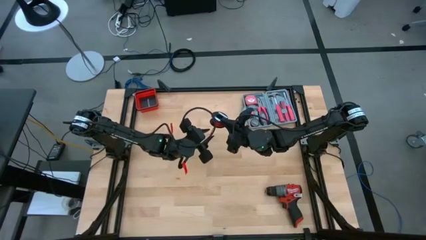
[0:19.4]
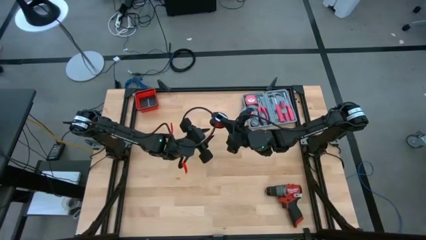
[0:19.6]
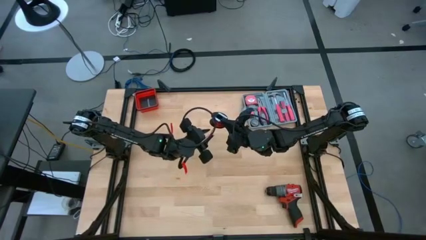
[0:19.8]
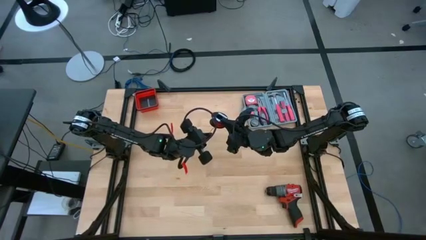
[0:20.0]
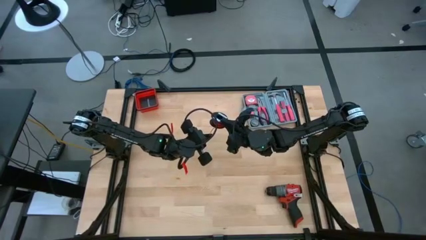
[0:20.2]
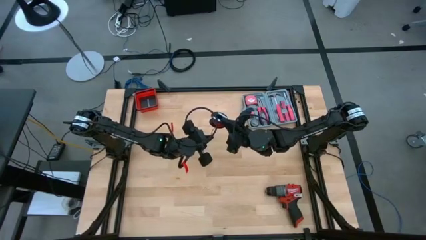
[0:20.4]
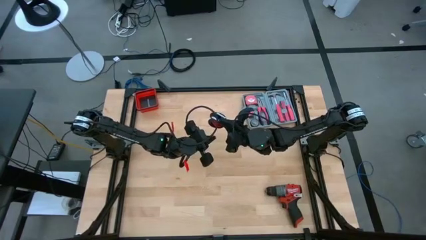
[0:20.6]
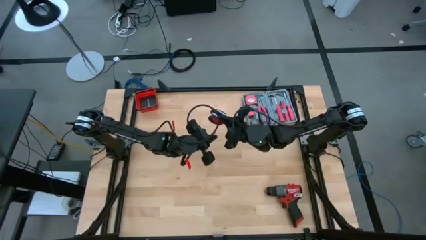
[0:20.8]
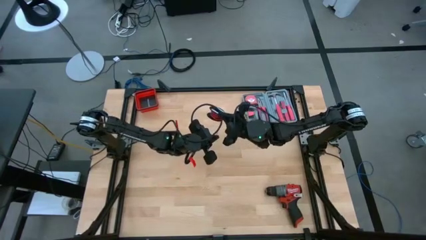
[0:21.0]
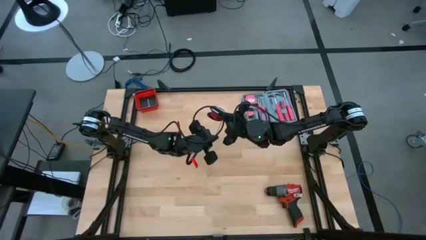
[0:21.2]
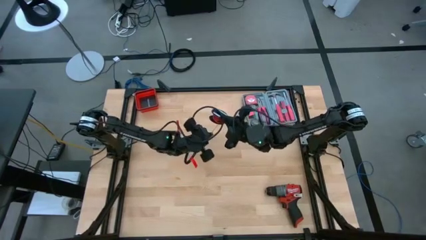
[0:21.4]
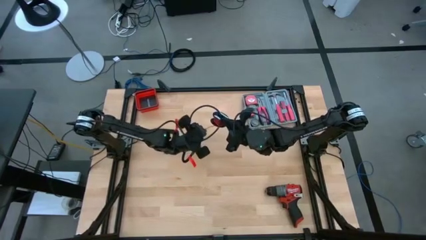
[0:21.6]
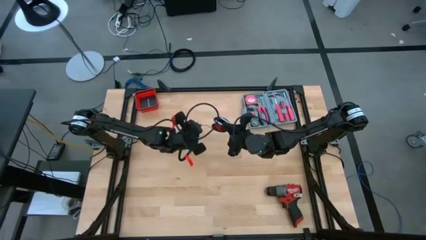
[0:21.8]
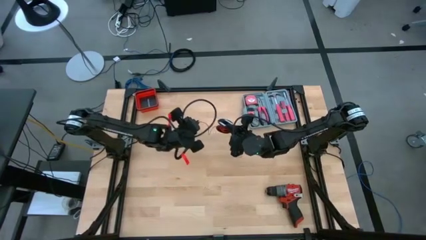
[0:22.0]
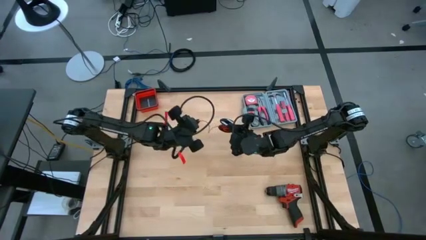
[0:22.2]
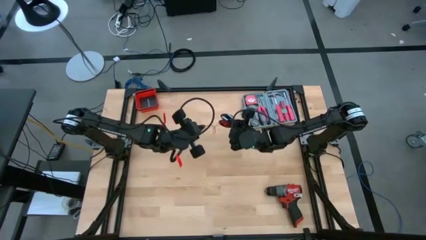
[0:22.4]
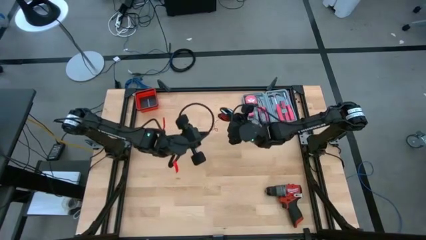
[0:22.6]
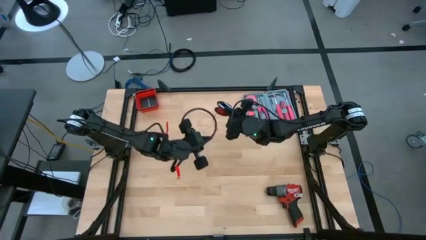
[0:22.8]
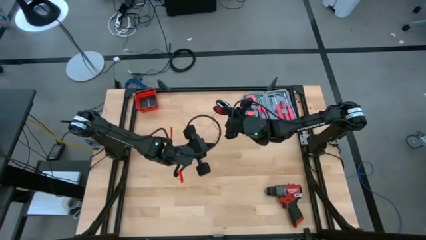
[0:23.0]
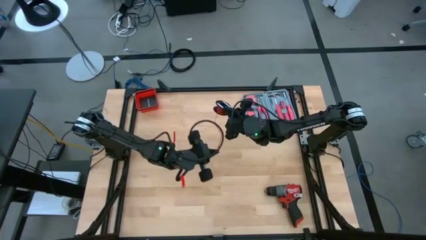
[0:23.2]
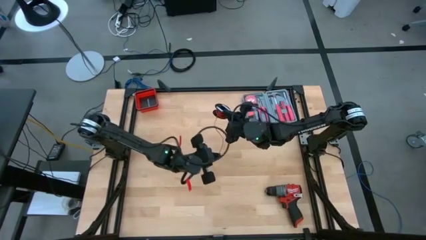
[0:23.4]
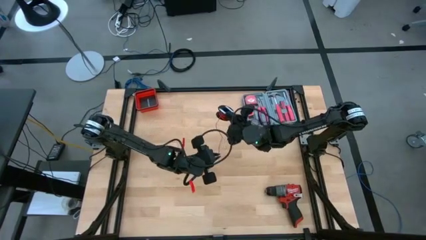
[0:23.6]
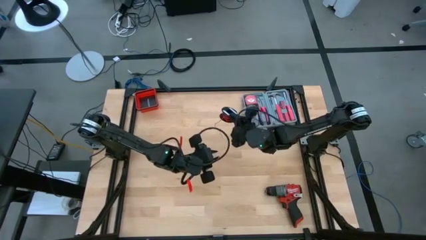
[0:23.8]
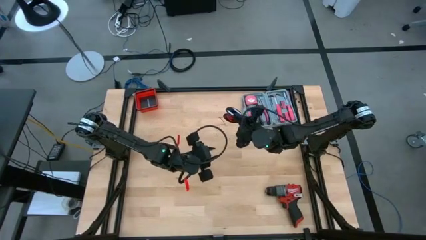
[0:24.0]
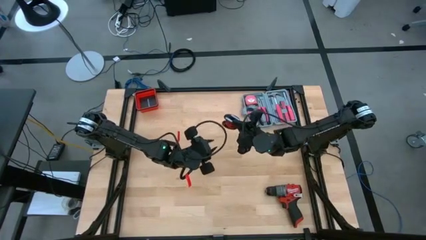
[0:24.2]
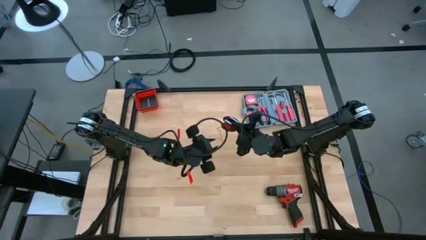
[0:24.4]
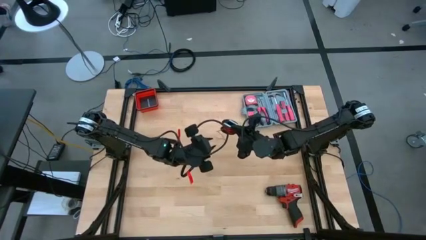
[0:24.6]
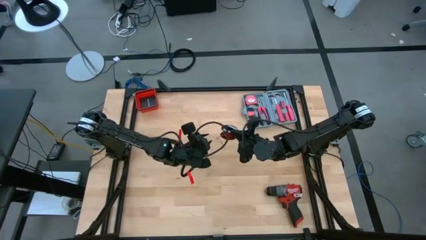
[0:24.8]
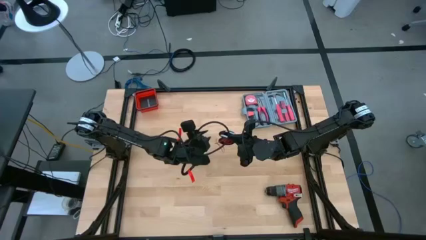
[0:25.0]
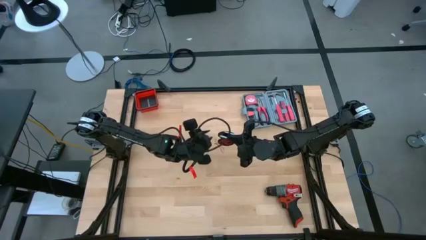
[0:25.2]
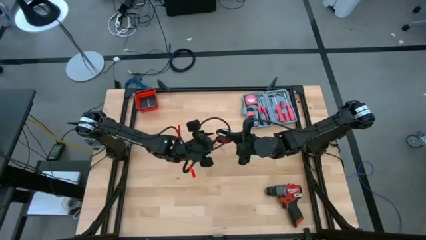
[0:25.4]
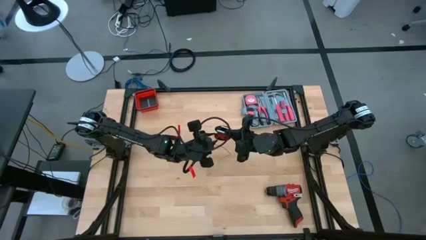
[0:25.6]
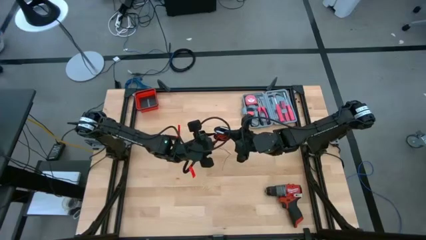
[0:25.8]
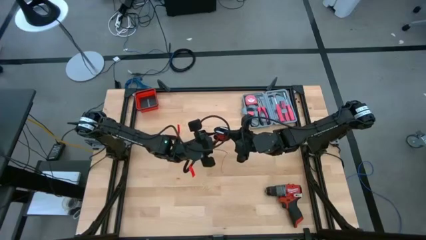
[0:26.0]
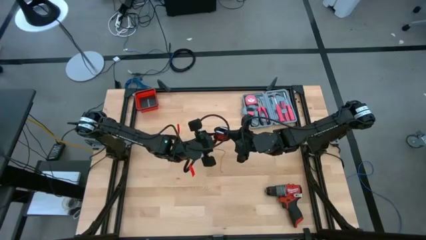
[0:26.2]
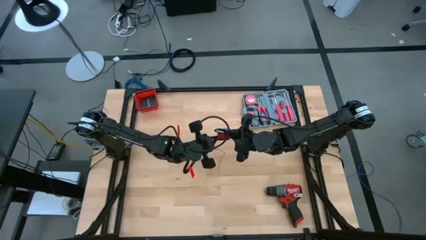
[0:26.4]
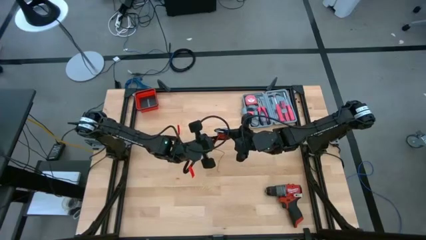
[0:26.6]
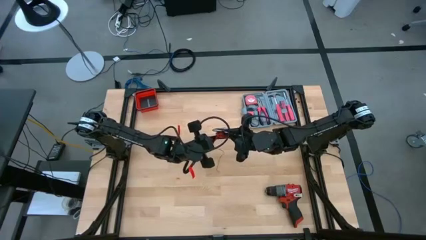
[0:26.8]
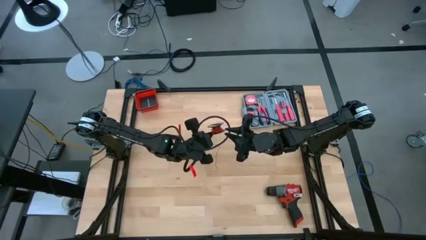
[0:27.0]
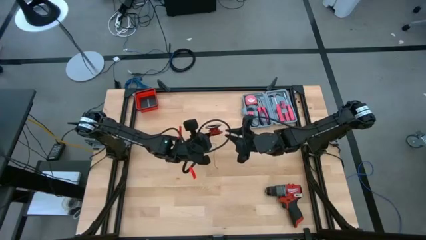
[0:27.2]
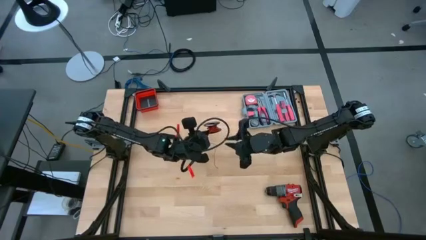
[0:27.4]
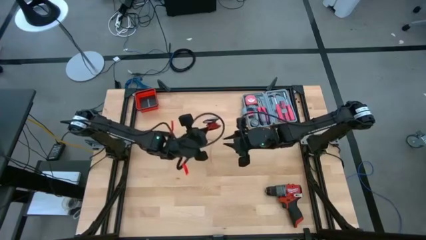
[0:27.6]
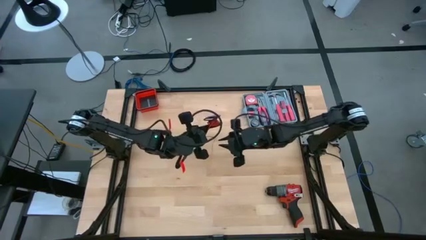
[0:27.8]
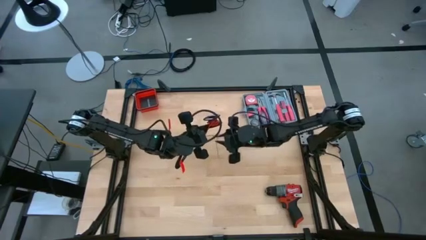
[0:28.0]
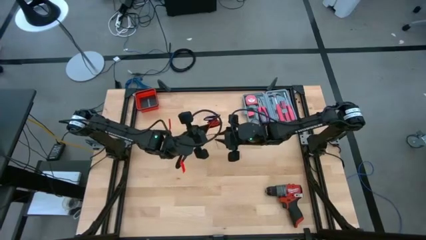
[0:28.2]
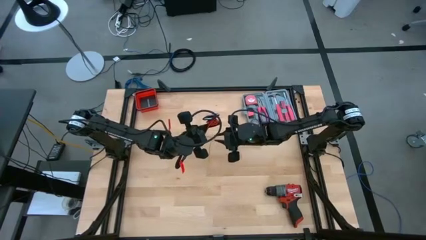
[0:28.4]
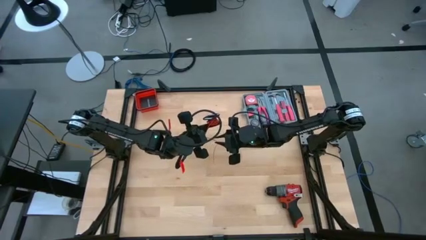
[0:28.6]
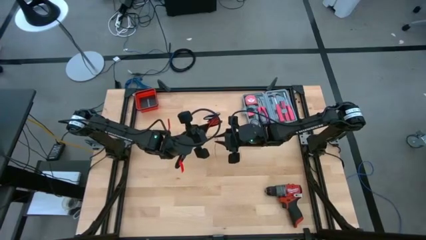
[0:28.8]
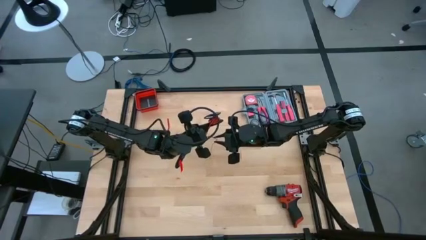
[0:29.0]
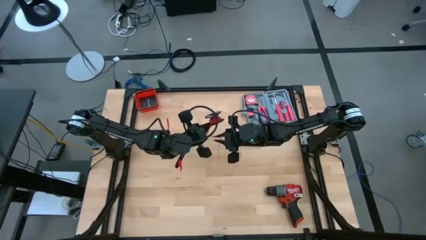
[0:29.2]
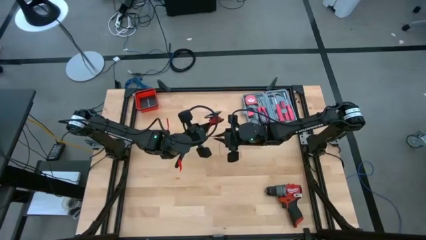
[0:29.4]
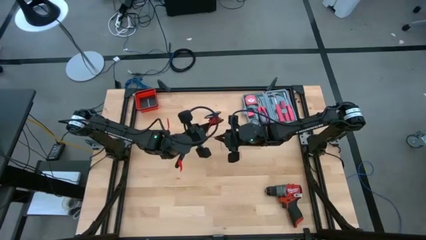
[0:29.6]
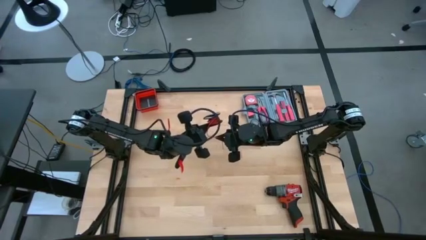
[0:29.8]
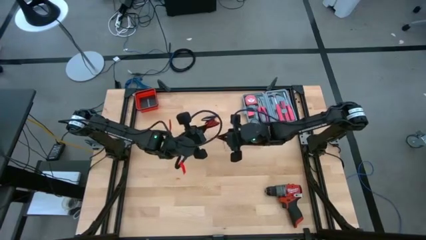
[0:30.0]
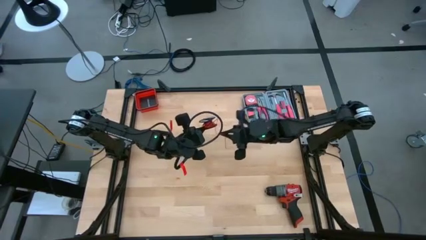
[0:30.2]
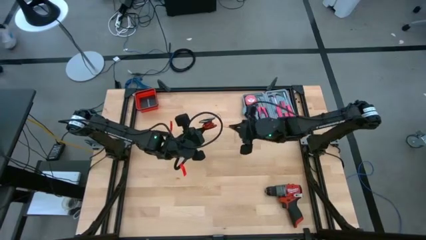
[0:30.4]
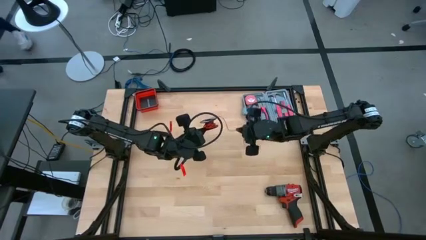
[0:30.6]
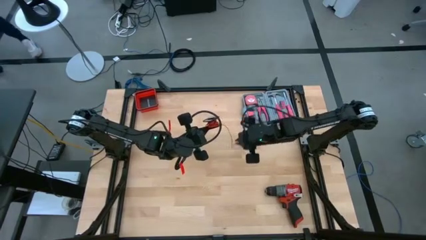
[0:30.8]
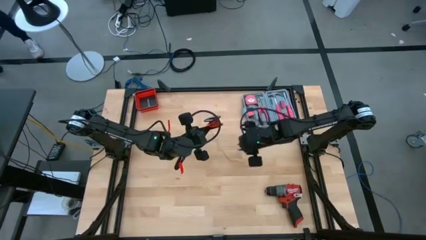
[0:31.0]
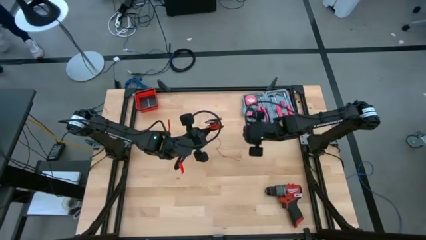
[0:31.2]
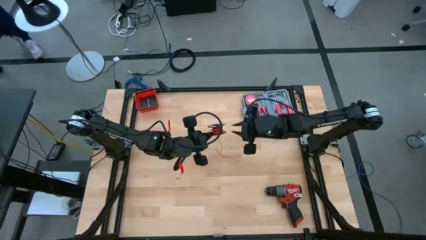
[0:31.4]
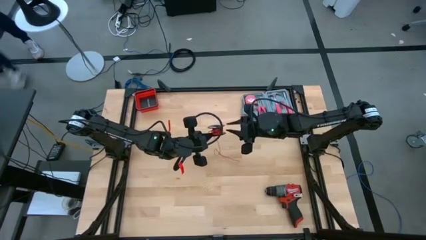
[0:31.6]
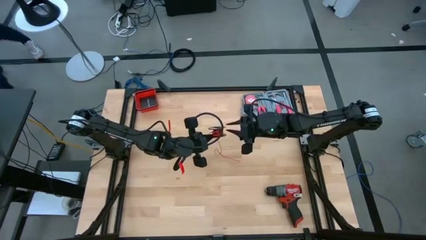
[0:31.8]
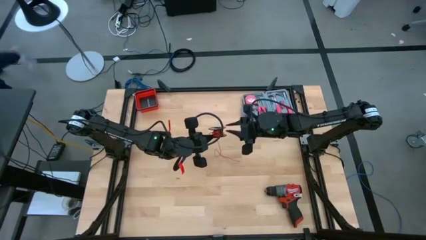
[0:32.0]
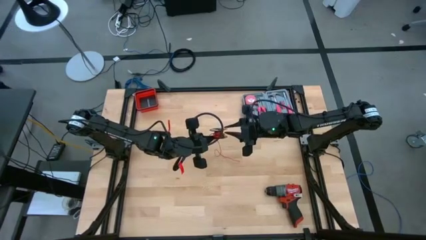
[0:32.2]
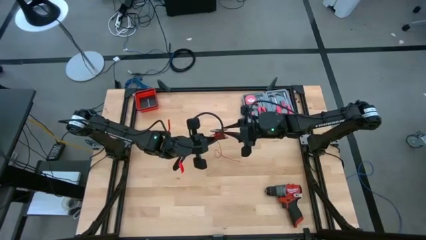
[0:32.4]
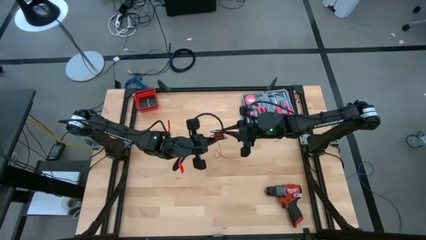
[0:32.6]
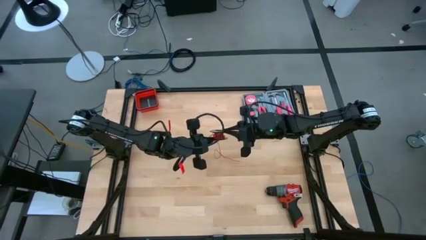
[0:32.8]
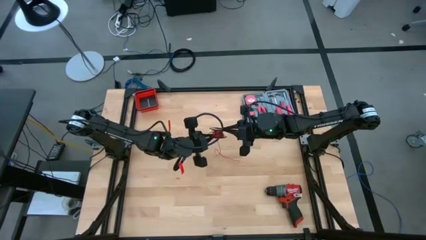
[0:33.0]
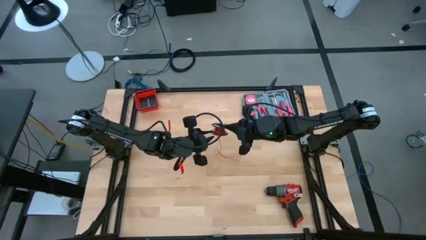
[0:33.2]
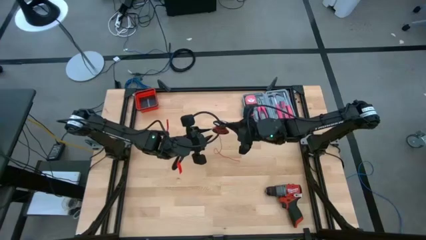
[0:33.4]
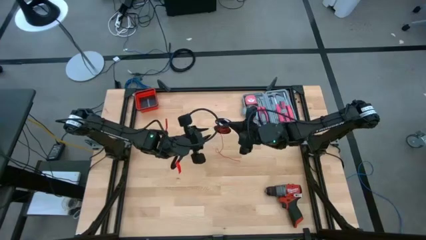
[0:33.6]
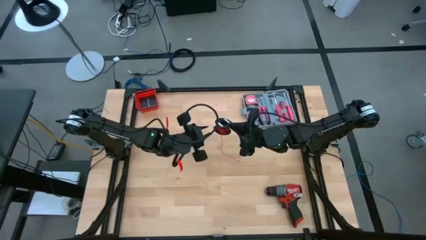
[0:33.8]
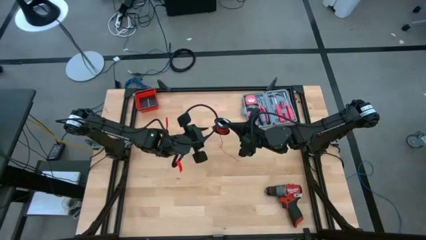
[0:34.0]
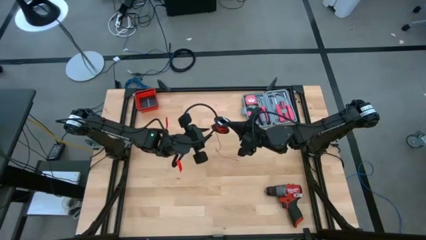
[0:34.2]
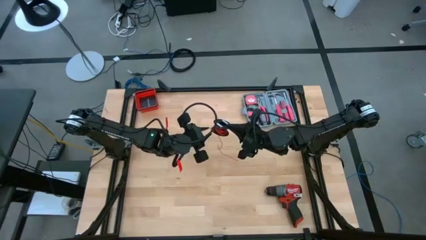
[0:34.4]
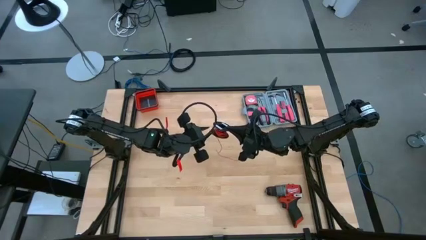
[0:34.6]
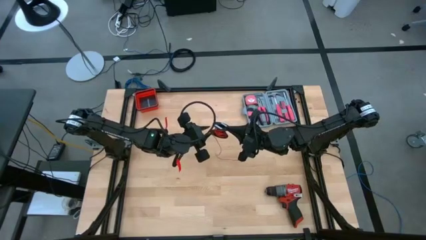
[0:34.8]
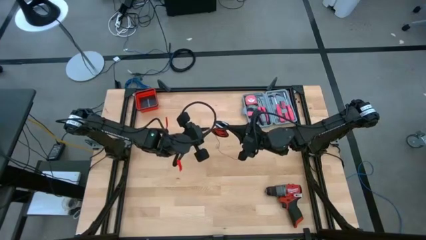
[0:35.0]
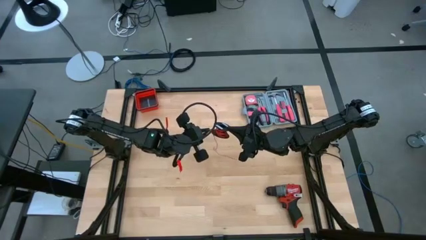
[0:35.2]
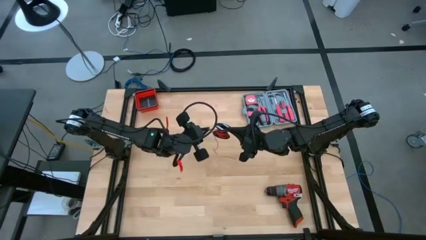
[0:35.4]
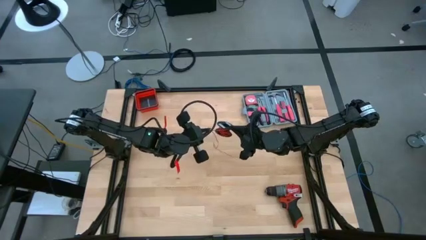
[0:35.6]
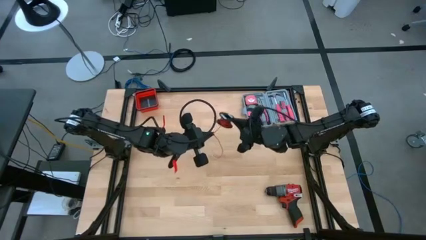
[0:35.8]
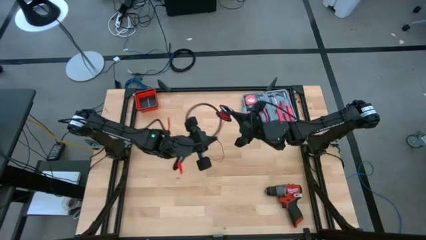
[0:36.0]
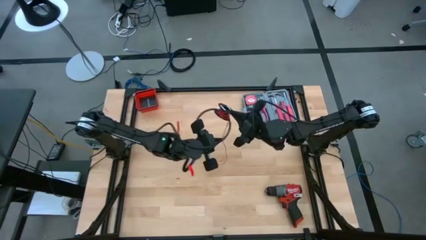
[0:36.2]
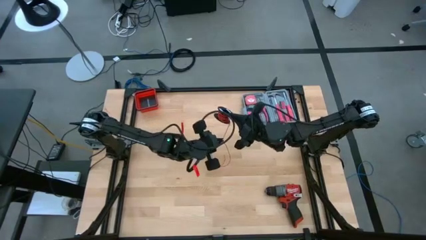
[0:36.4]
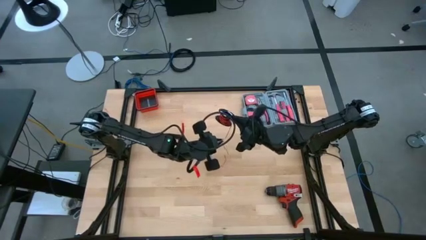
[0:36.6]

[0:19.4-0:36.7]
Task: Coil cords
Uncoil the red wire from the black spool
